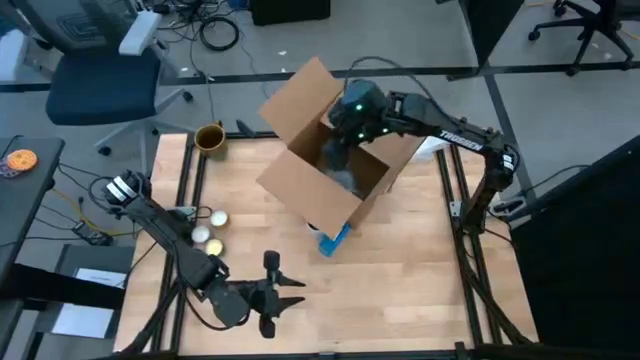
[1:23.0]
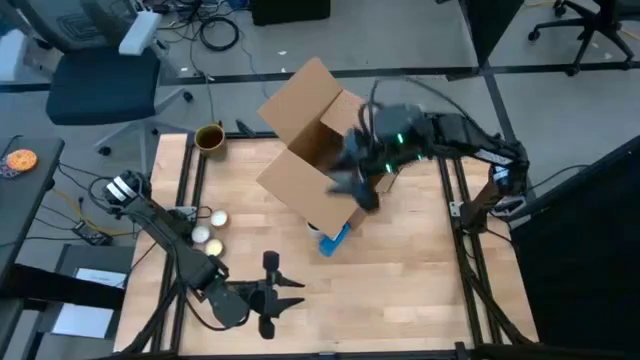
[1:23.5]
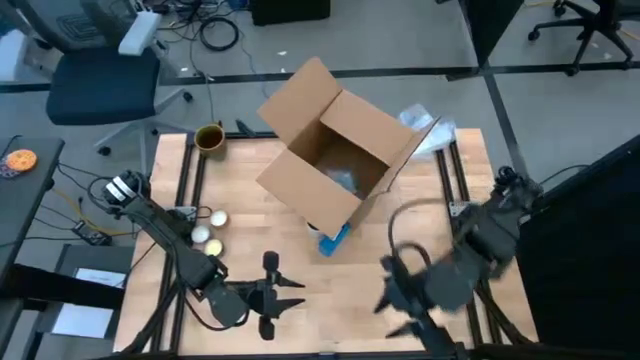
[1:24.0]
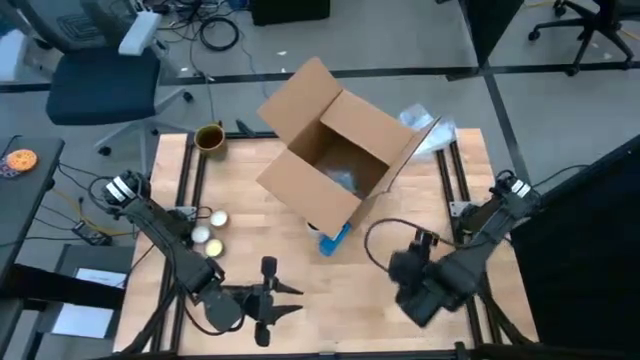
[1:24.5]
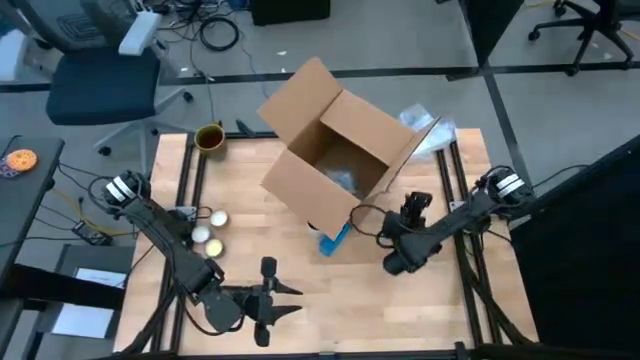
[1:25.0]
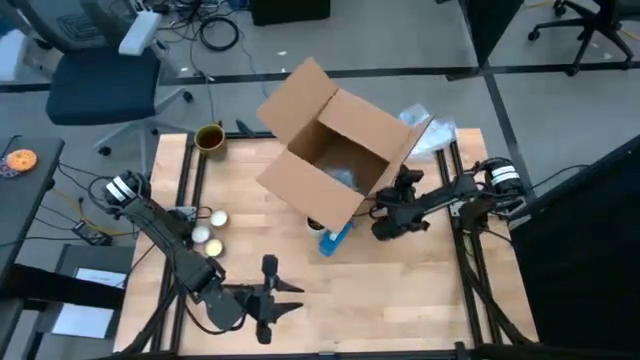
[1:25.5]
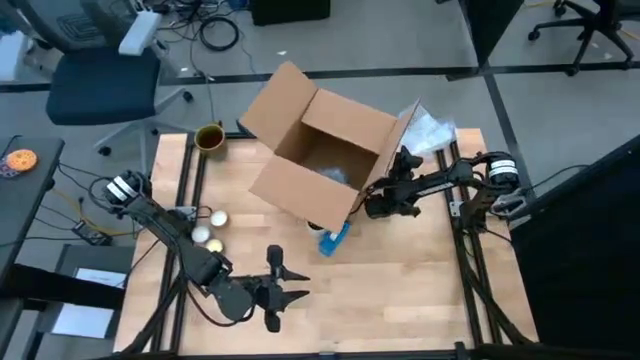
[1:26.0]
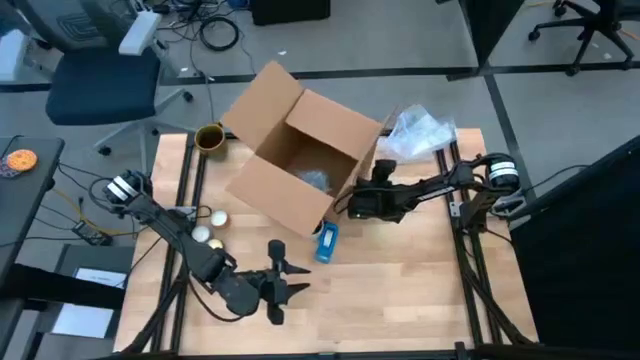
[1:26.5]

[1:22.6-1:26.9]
Task: wrap mug
Adjust the cardboard box on the table

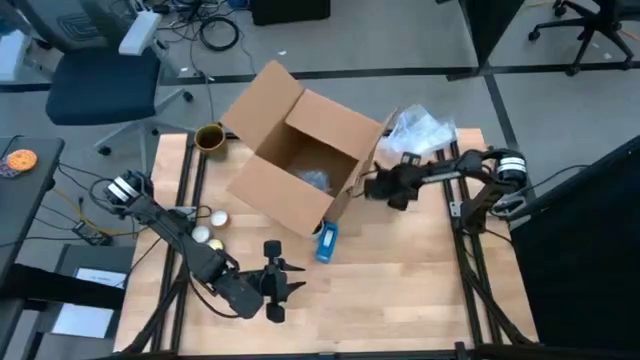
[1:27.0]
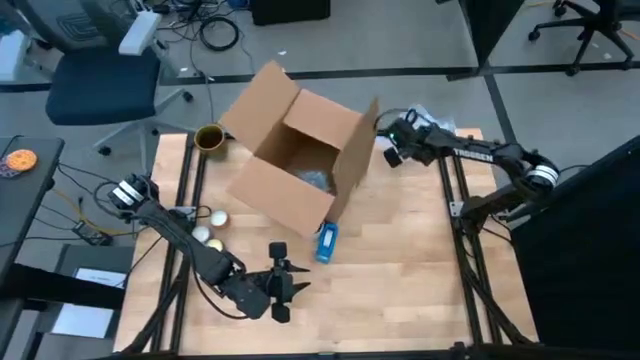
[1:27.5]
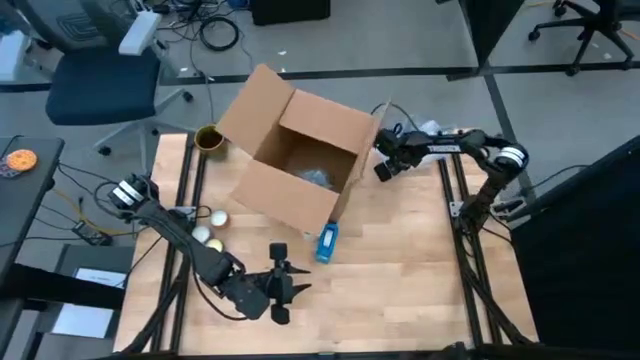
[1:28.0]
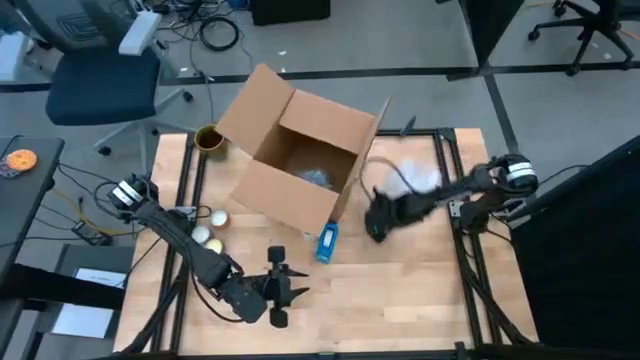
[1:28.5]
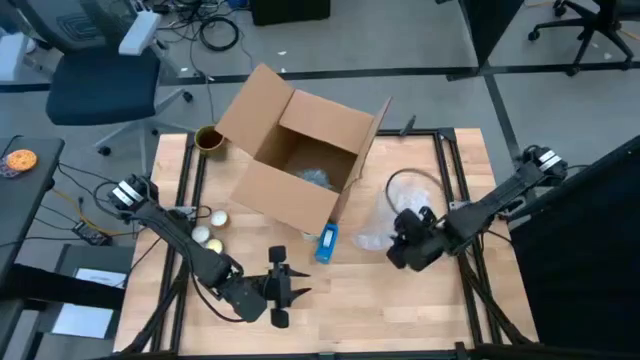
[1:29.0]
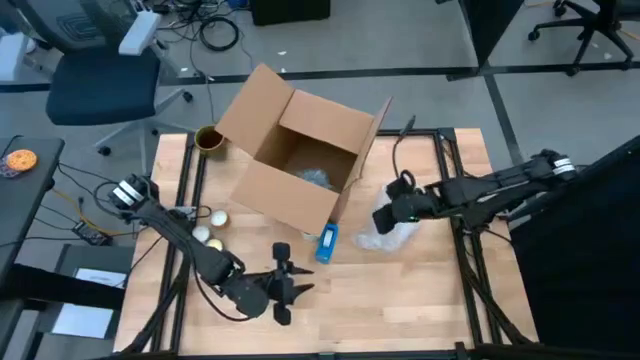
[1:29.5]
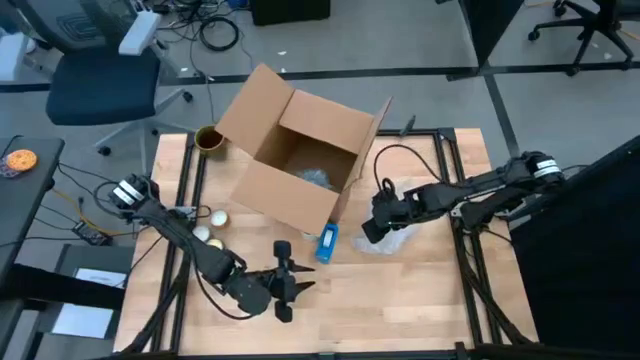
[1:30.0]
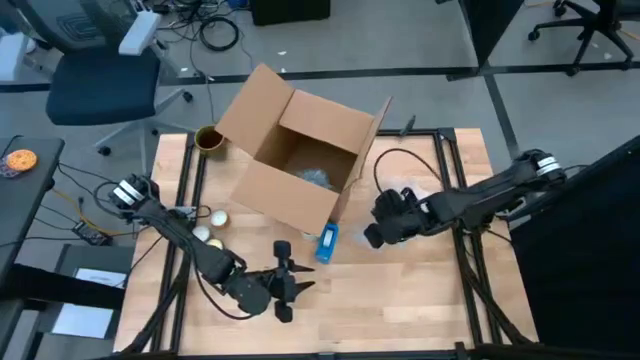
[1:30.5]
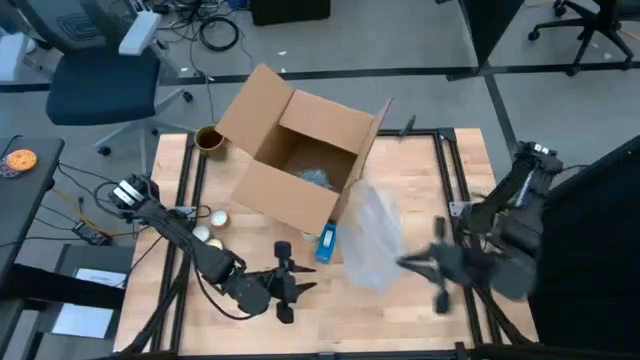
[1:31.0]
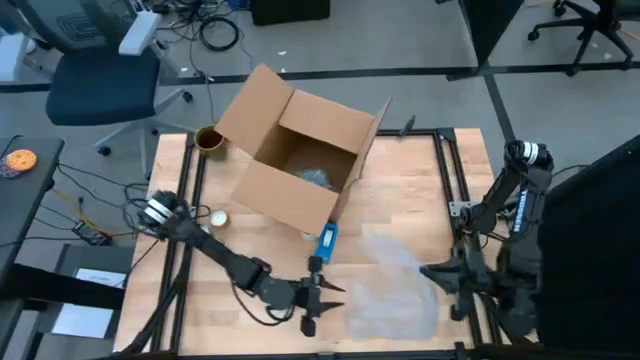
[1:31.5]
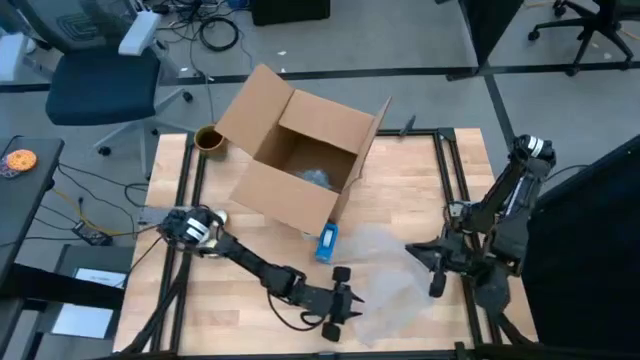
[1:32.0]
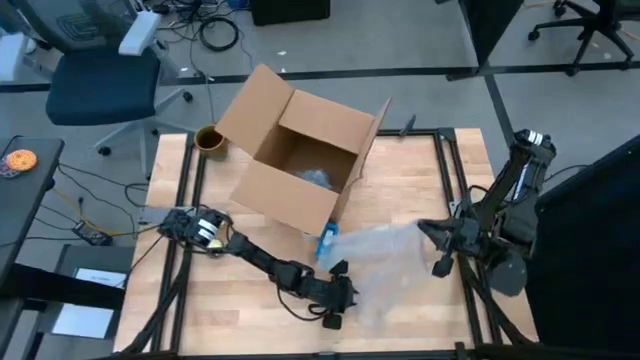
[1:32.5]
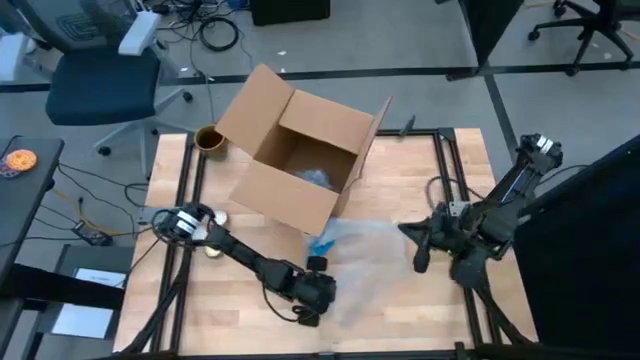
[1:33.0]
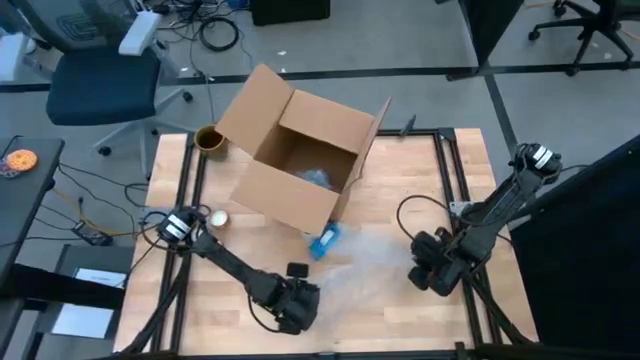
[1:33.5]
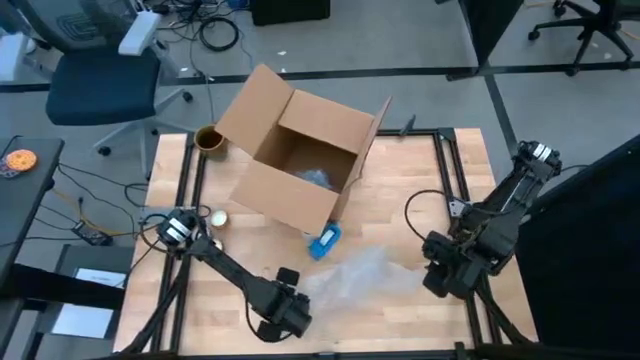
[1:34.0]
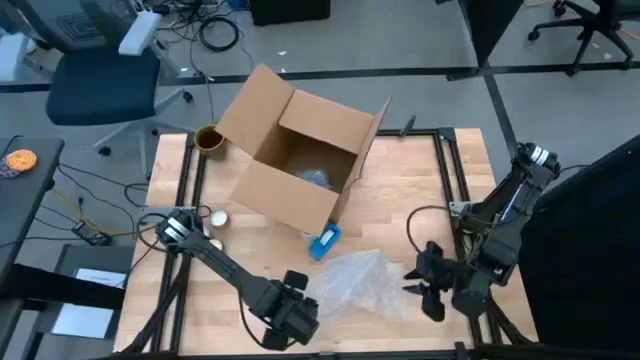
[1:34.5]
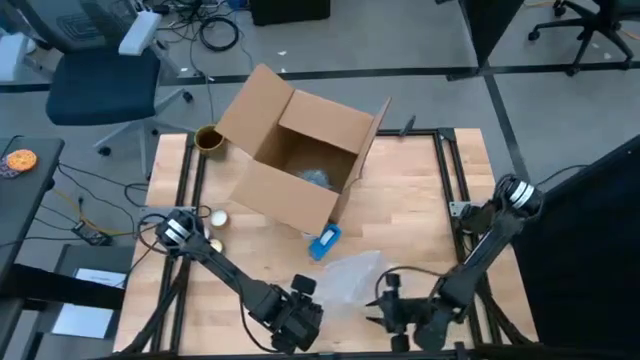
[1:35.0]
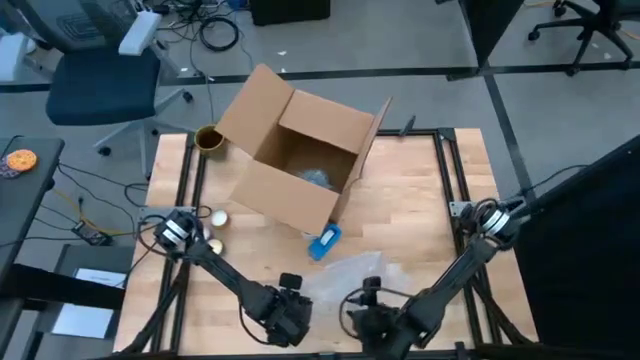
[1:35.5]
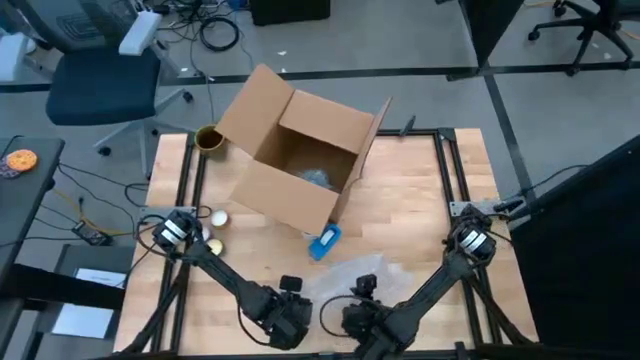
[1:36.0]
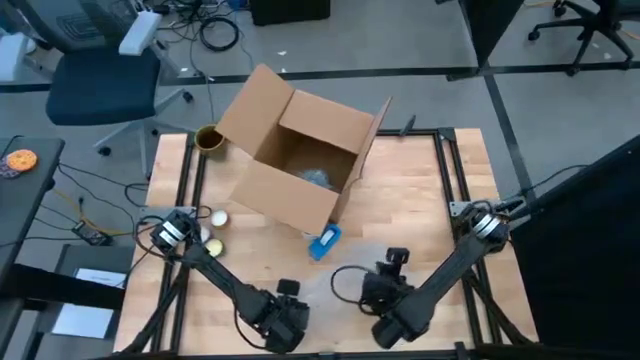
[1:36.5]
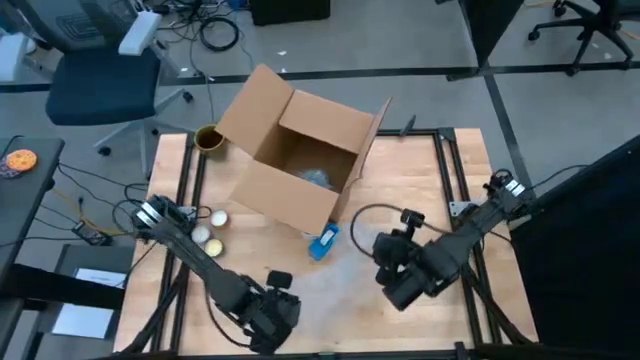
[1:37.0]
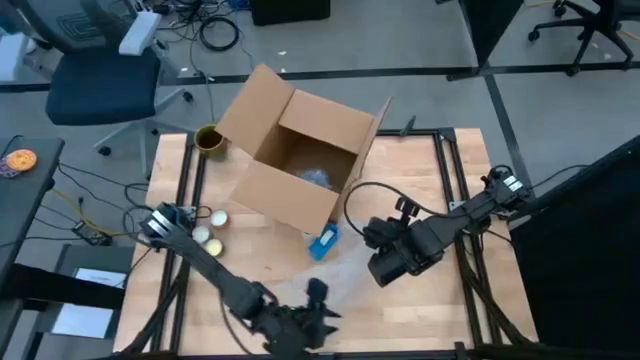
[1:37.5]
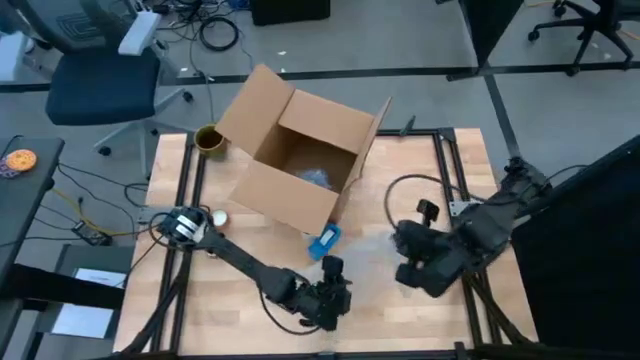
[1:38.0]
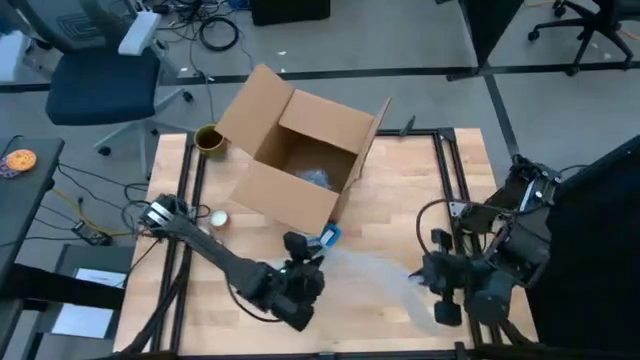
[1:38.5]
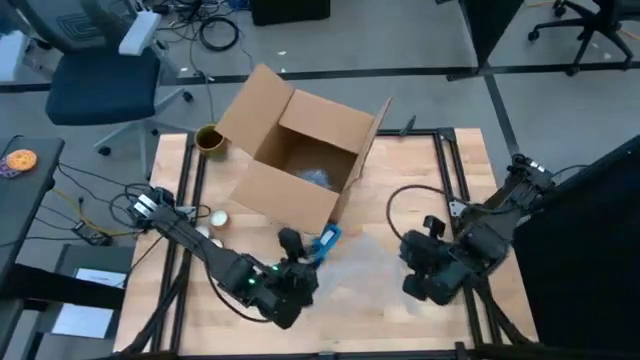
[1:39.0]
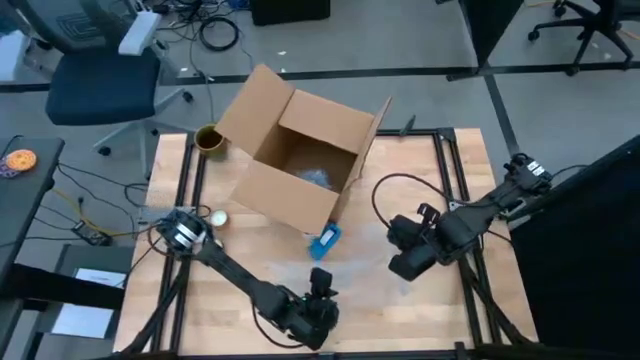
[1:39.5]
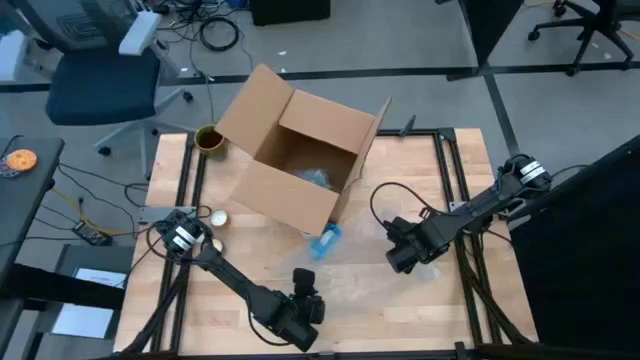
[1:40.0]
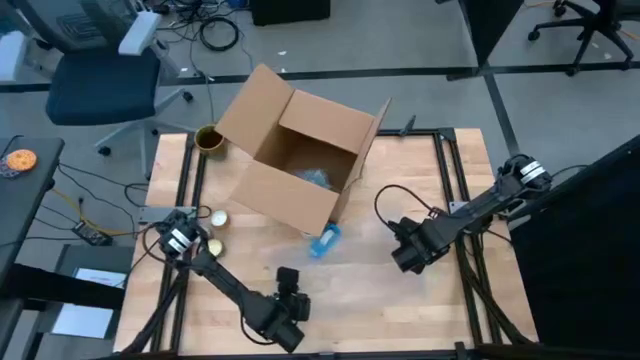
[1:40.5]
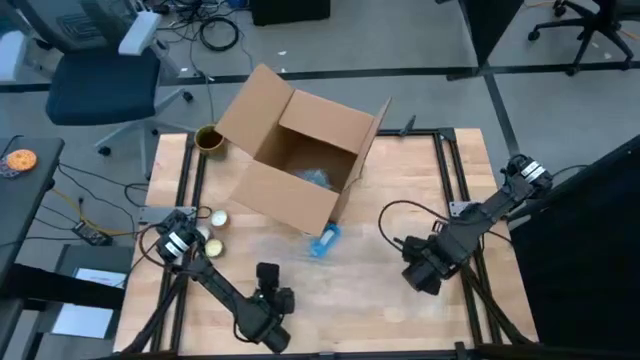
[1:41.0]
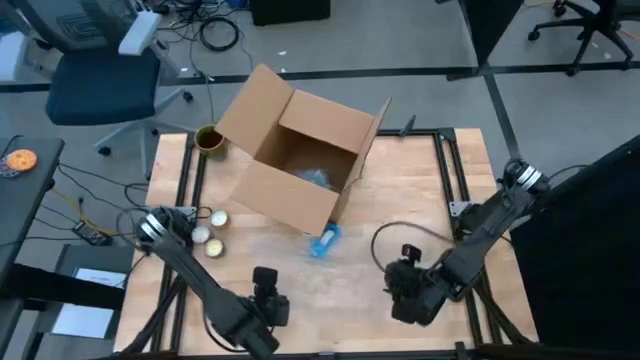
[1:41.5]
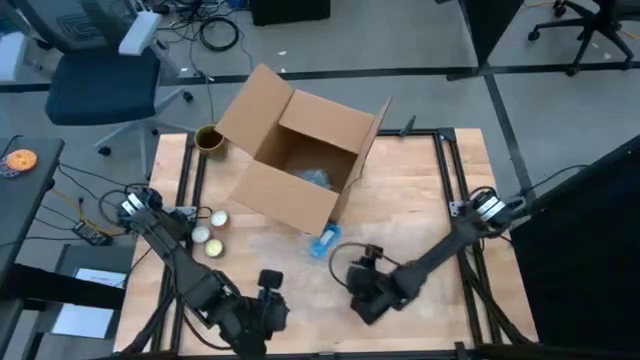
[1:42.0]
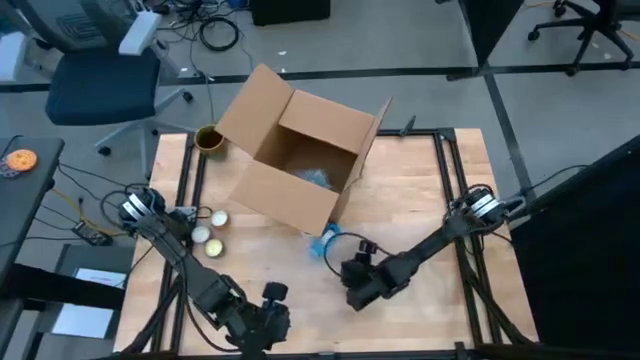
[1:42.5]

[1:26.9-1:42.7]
Prepare the bubble wrap on the table
